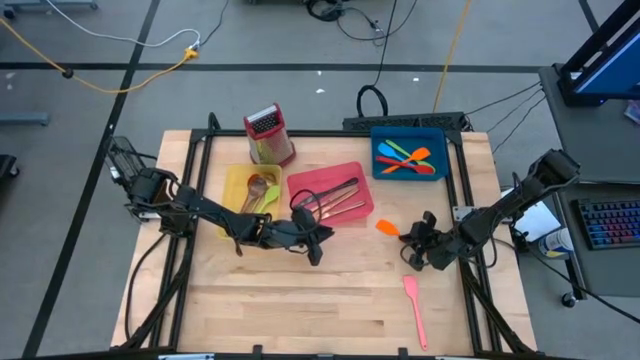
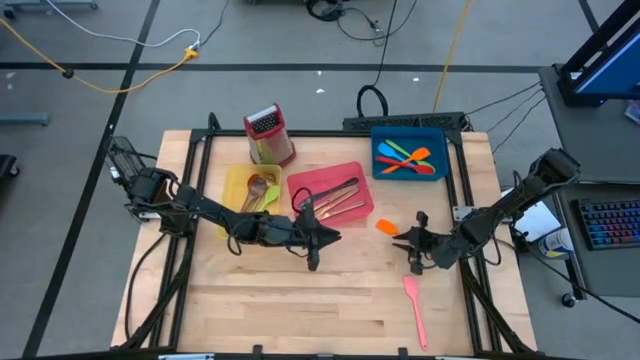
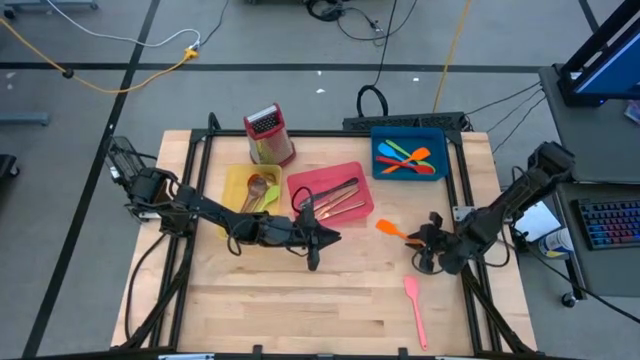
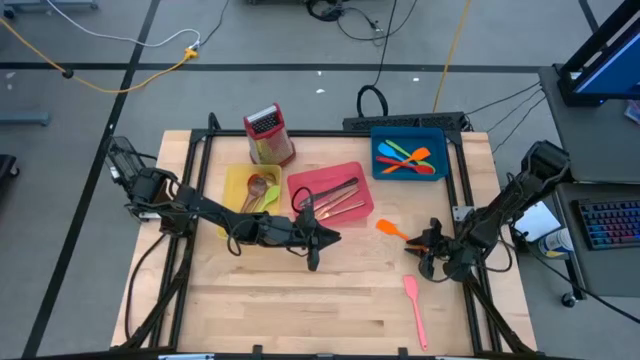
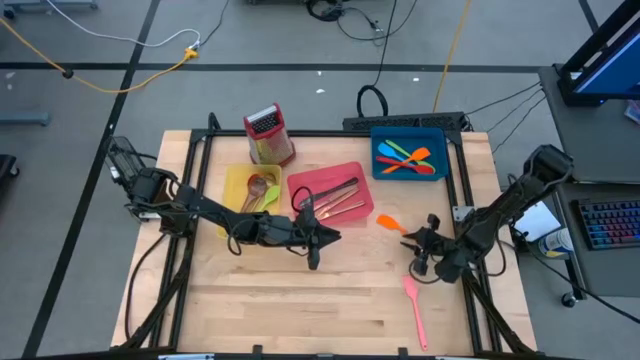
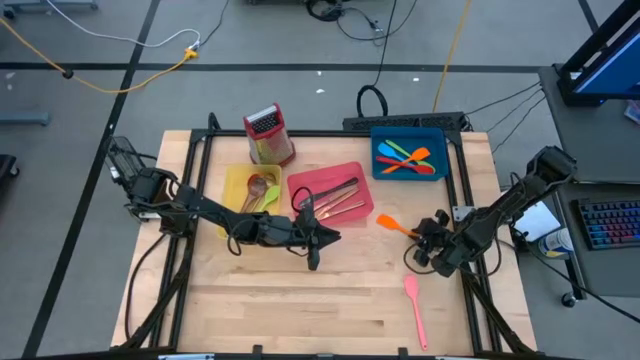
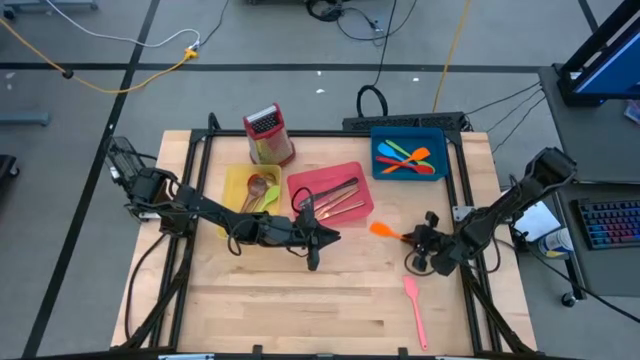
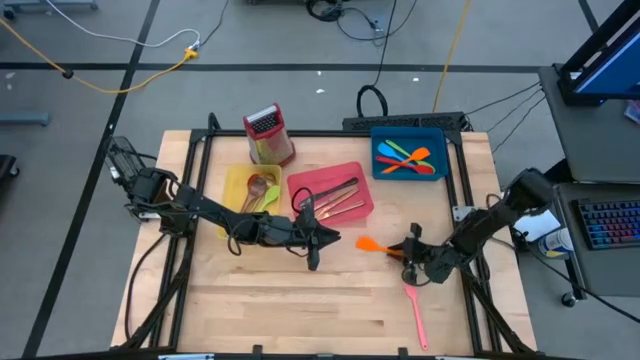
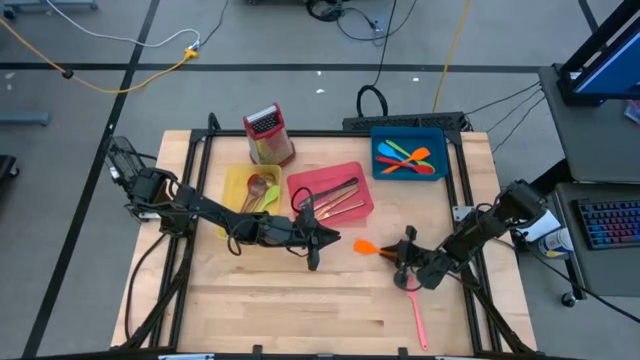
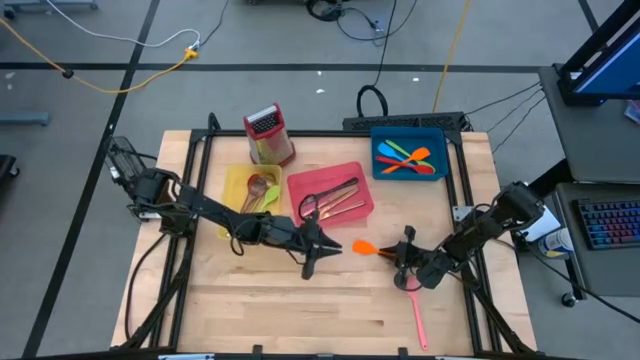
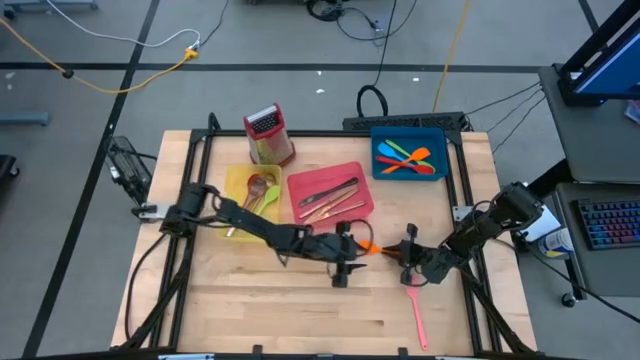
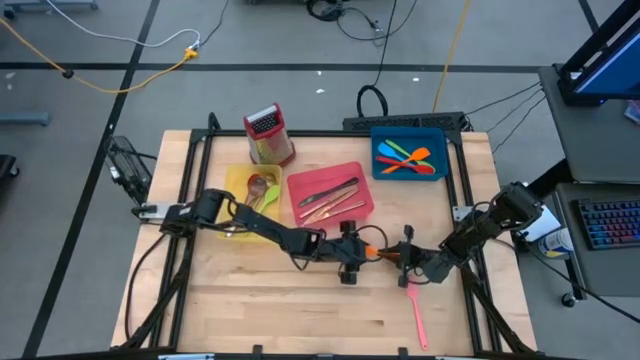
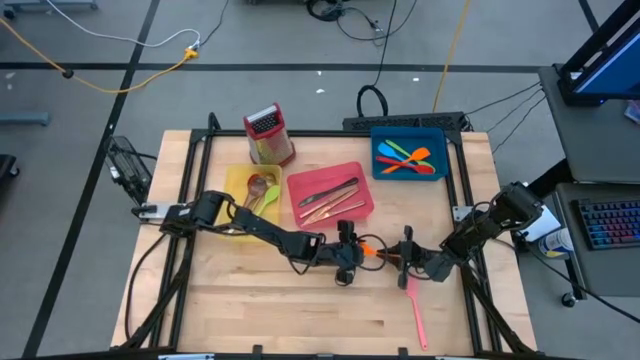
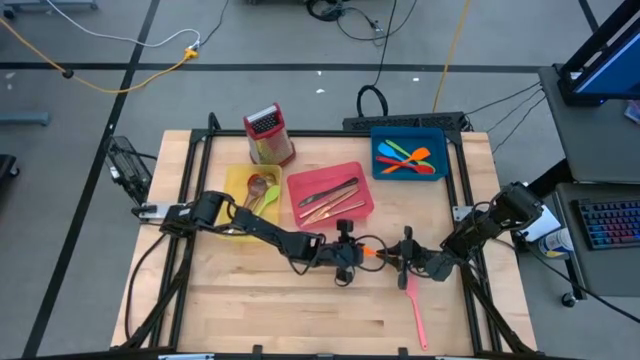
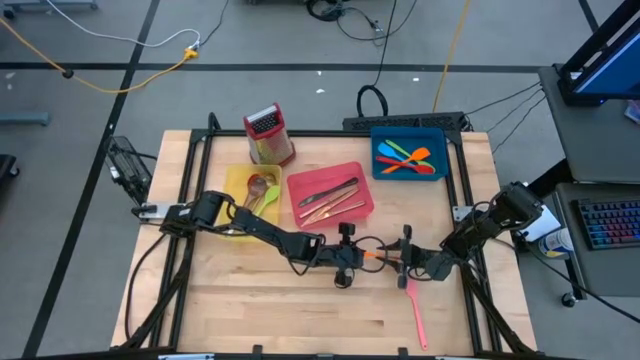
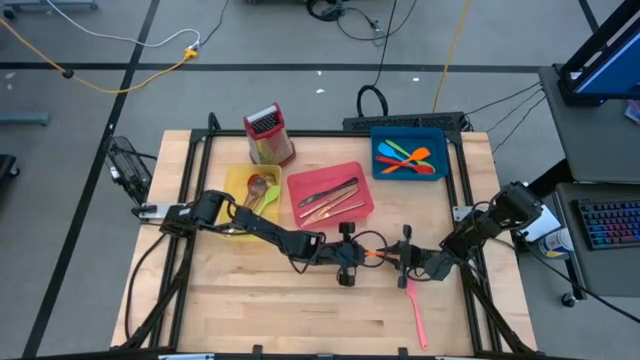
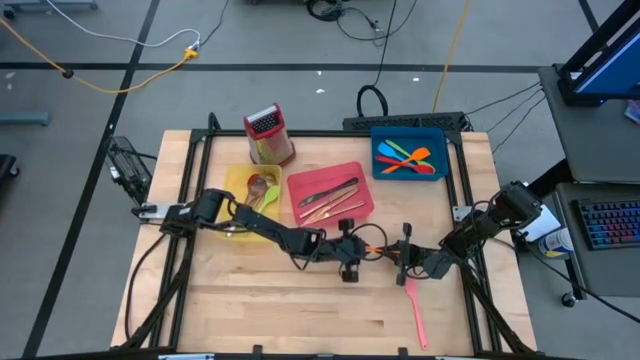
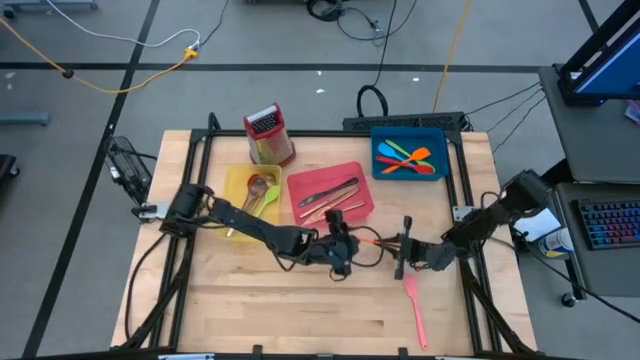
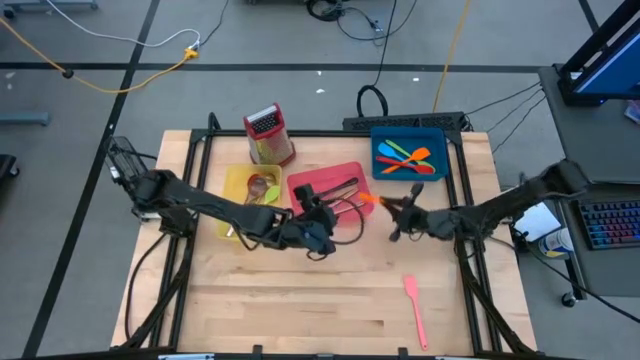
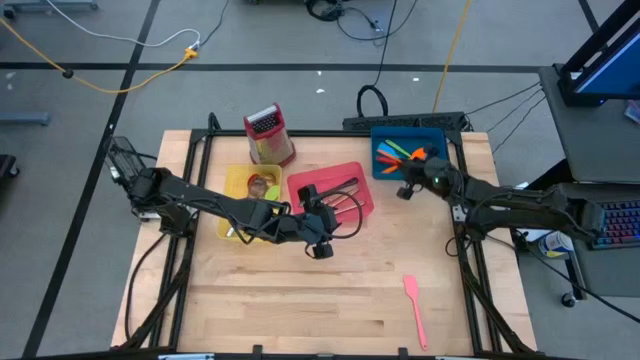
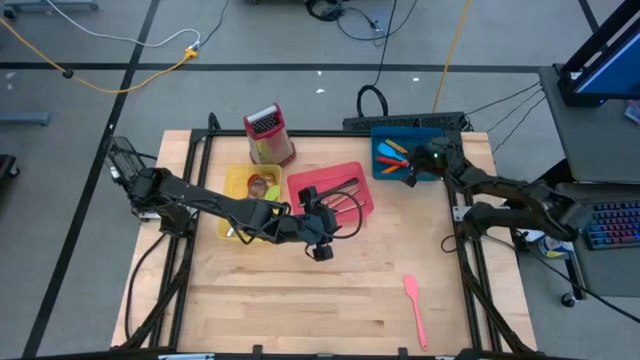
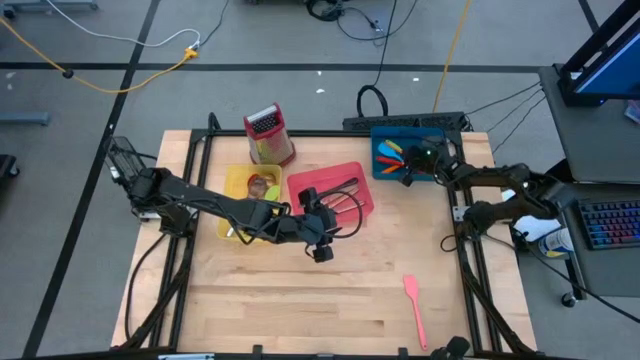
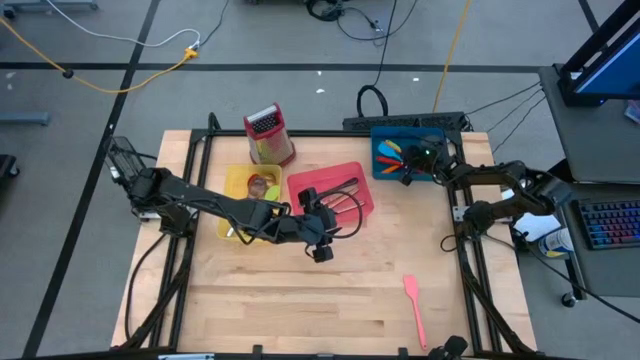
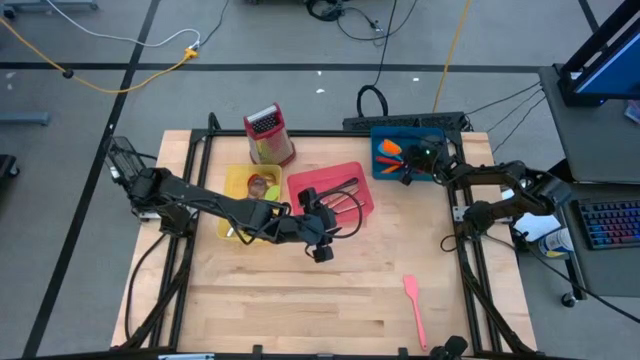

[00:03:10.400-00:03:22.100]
Task: Pick & Place Kitchen Items
Put the orange spatula into the blue bin

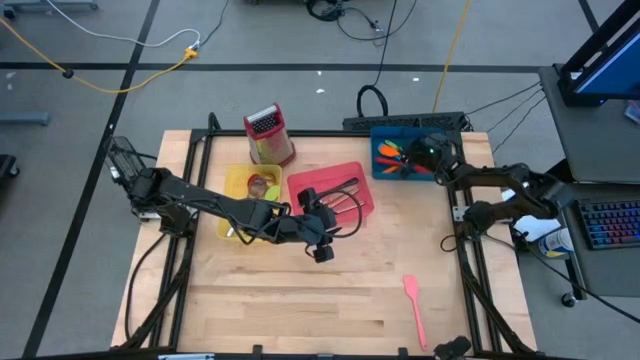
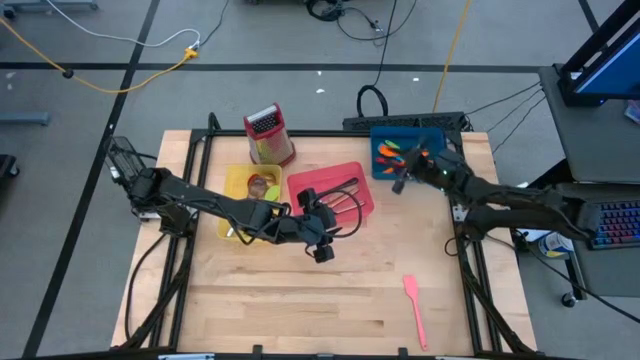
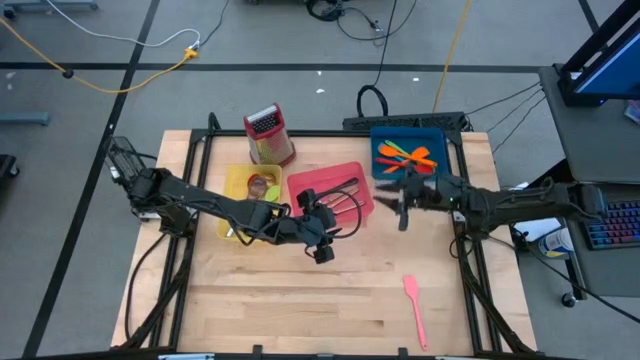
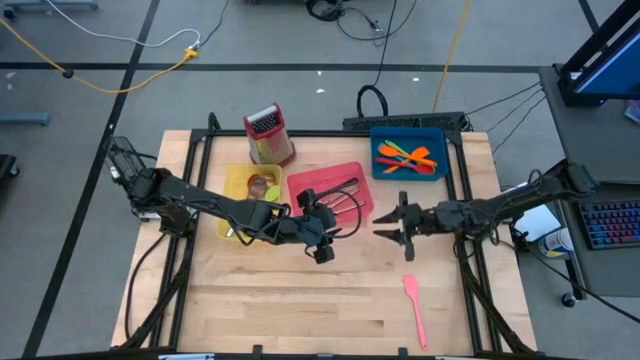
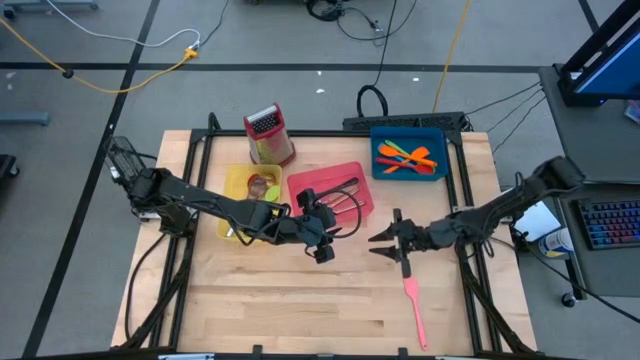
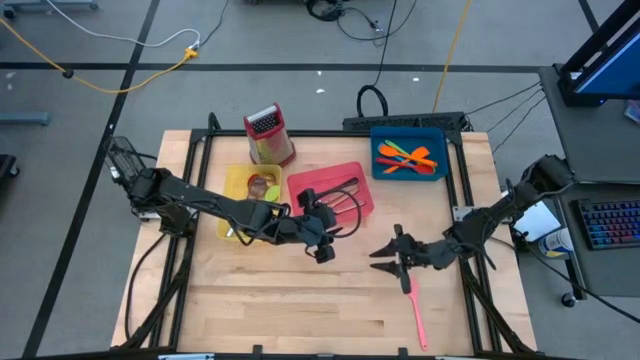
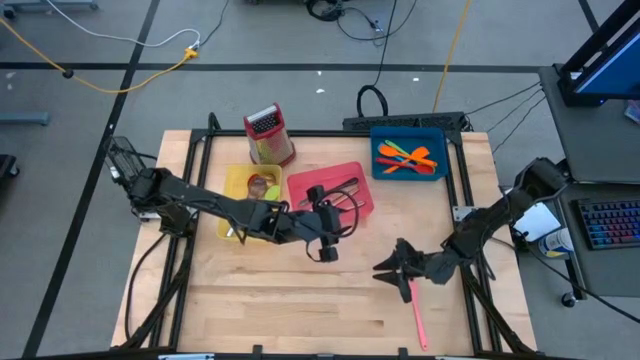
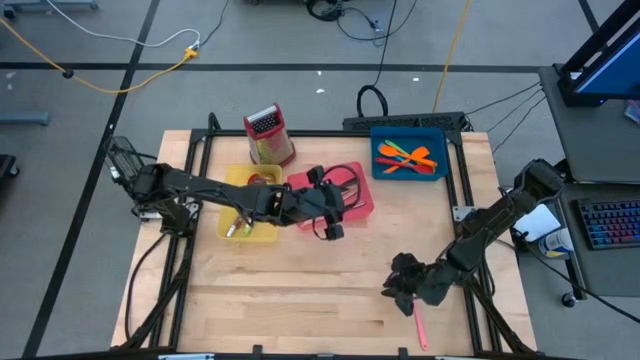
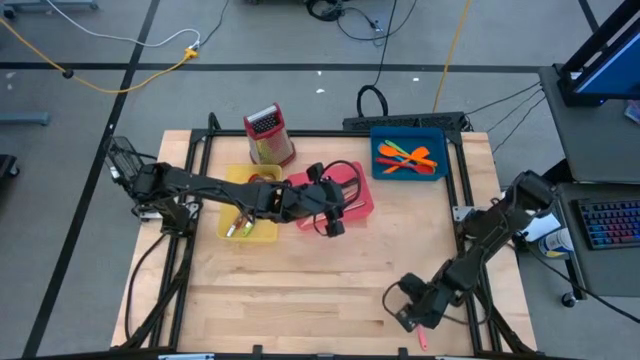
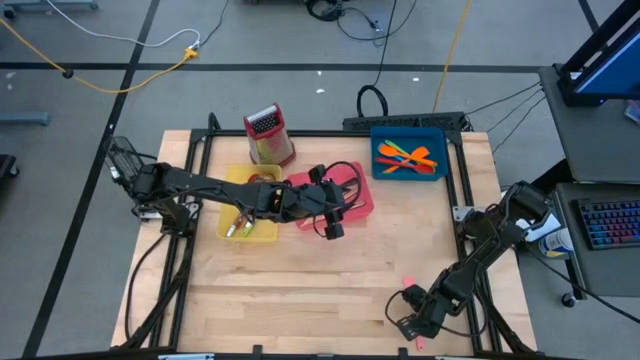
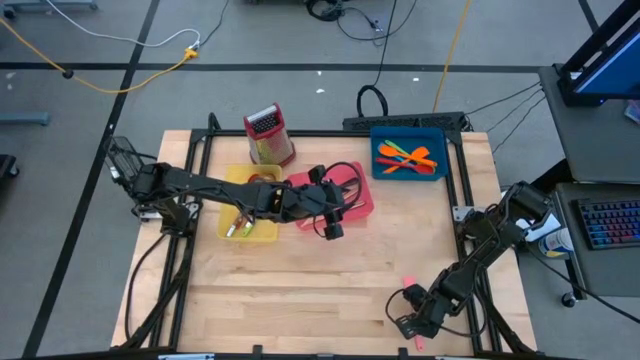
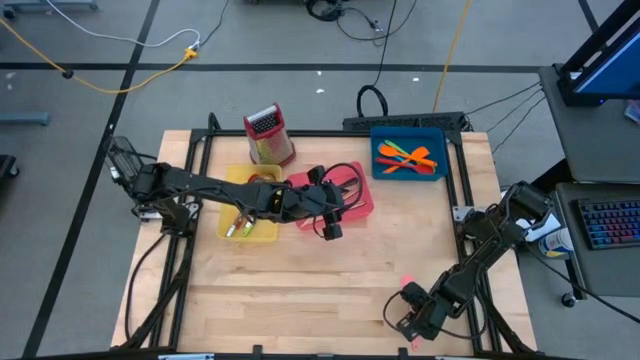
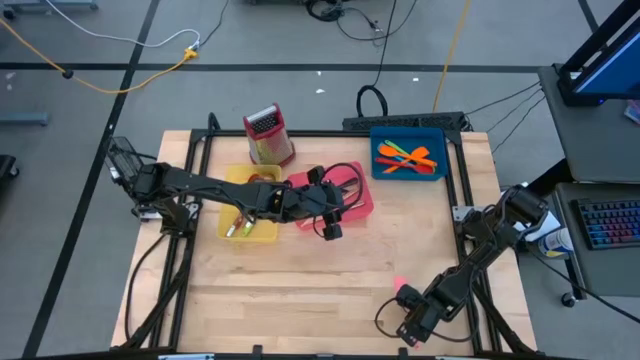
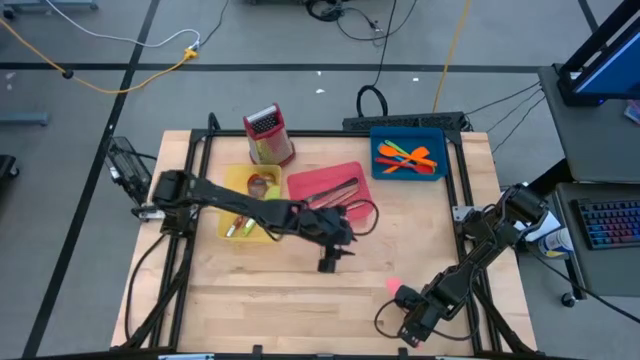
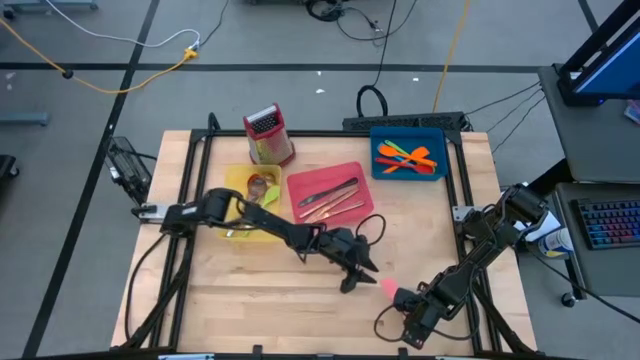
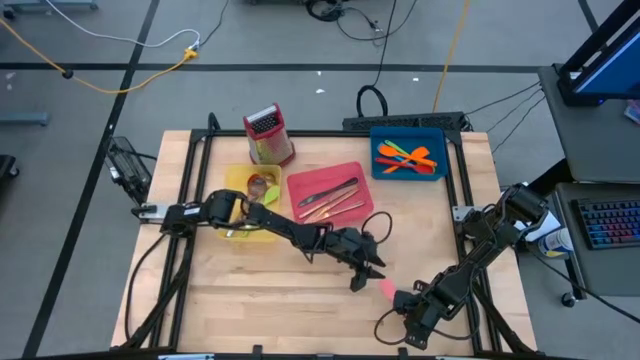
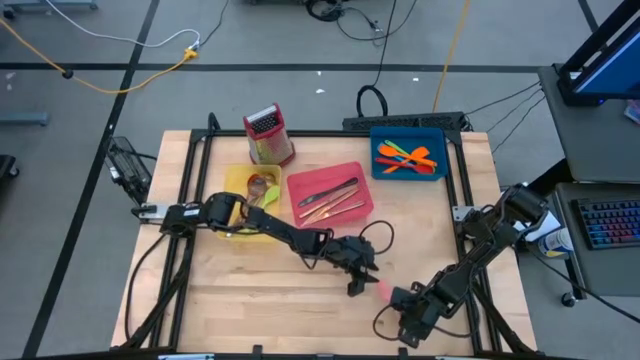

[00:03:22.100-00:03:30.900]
Put the pink spatula into the blue bin

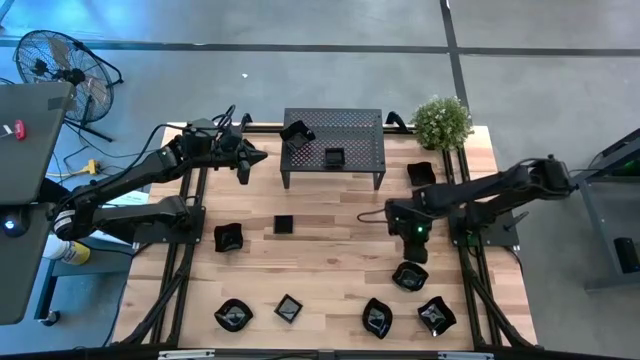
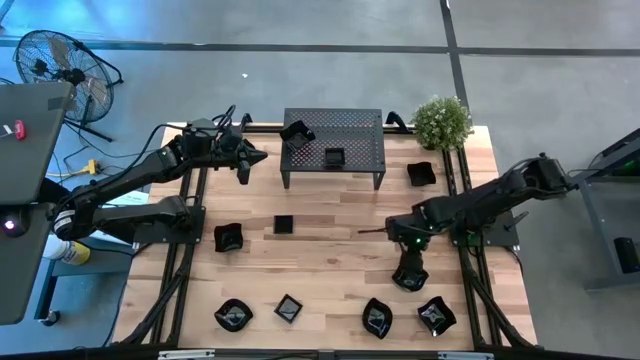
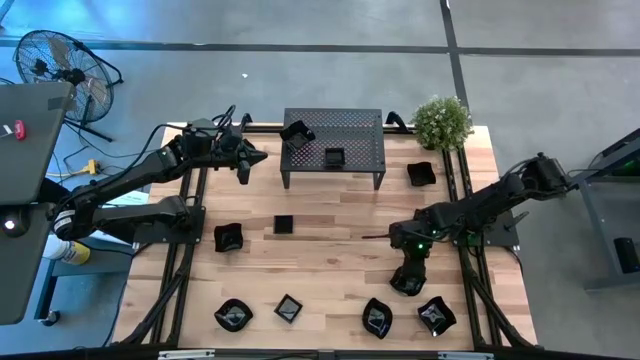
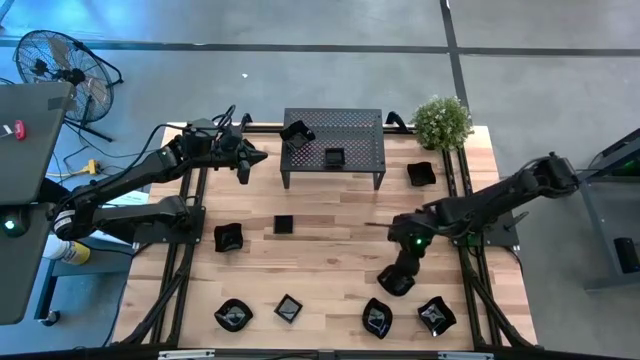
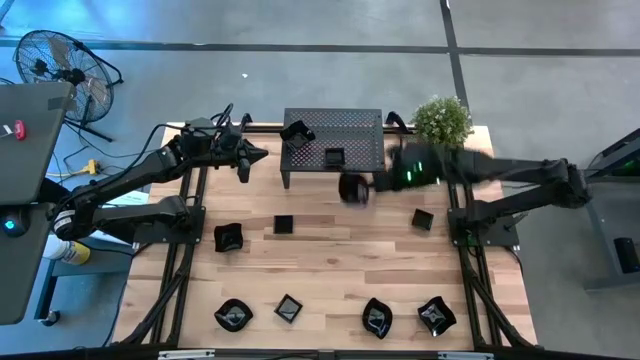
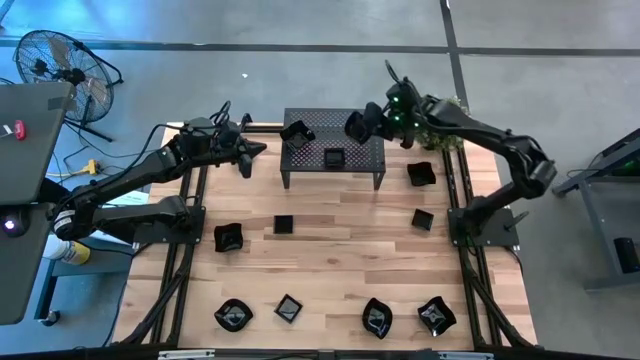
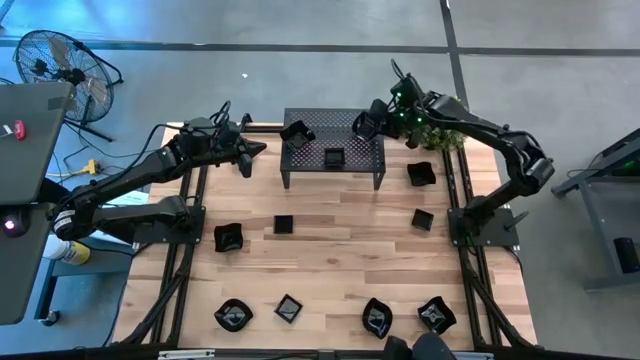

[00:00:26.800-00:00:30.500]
Task: Pick & Place Mini shaped plates
Put the black leaf shaped plate on the shelf
